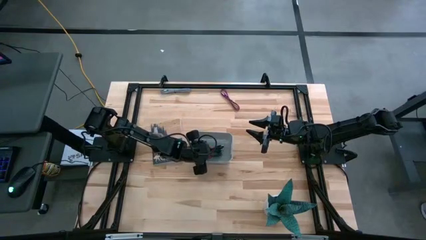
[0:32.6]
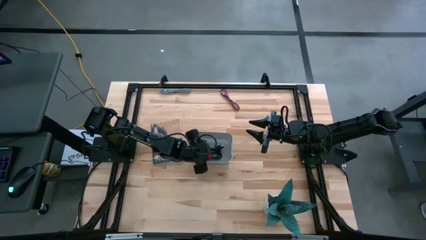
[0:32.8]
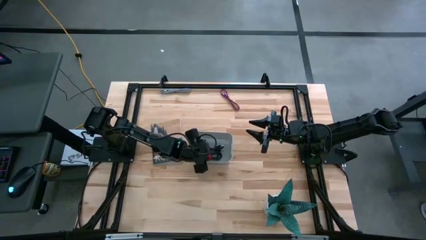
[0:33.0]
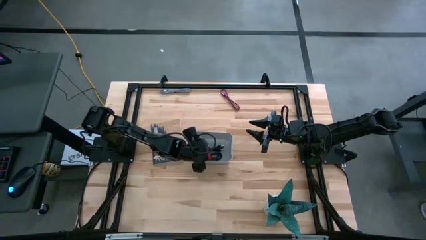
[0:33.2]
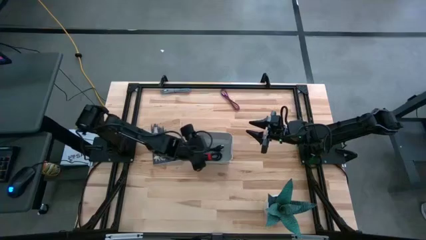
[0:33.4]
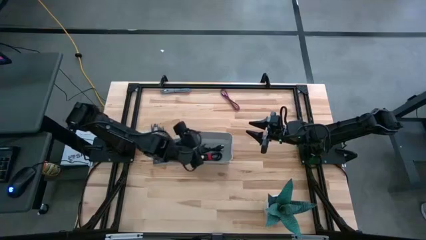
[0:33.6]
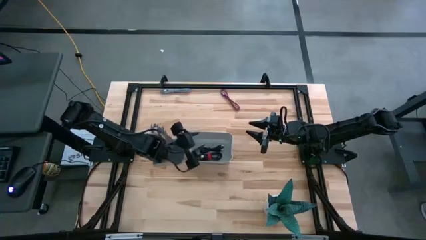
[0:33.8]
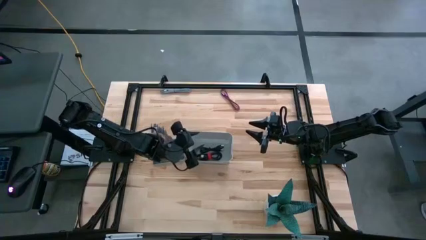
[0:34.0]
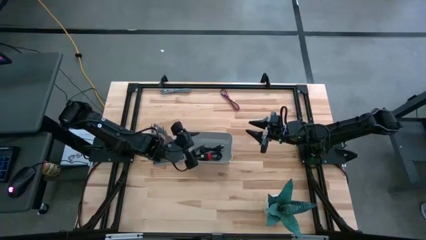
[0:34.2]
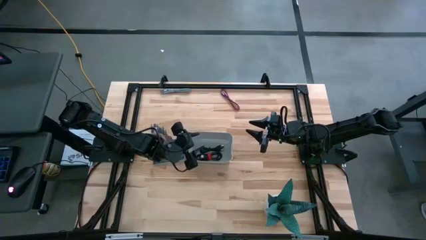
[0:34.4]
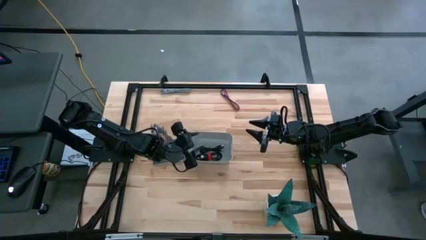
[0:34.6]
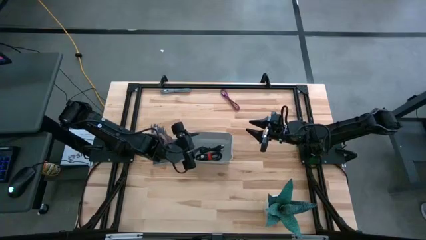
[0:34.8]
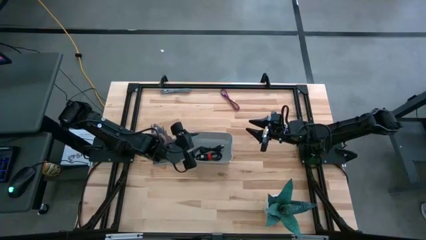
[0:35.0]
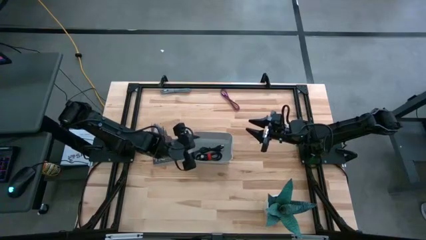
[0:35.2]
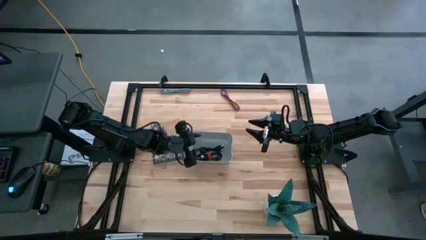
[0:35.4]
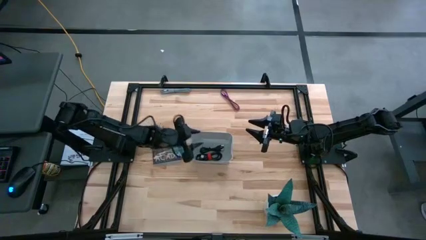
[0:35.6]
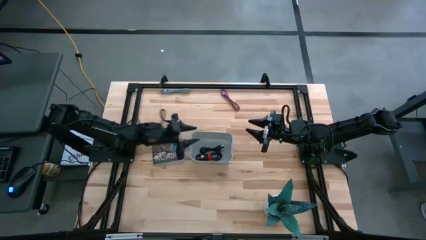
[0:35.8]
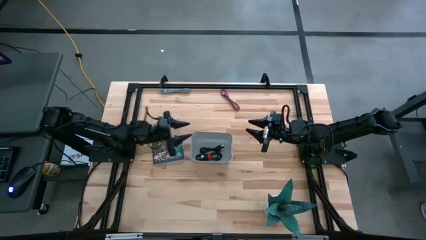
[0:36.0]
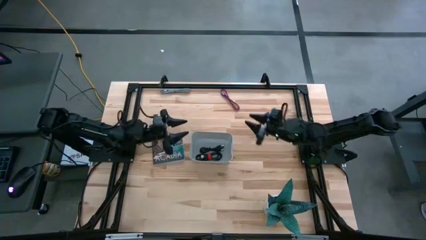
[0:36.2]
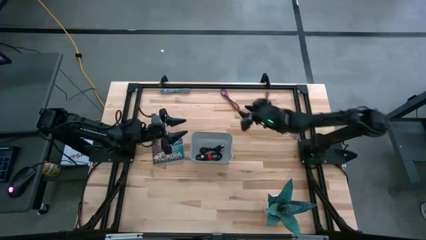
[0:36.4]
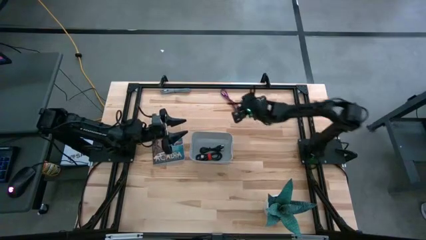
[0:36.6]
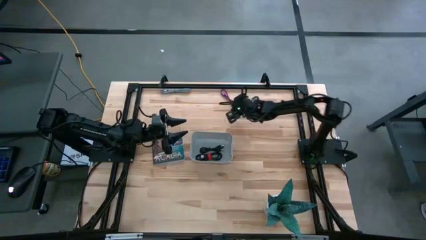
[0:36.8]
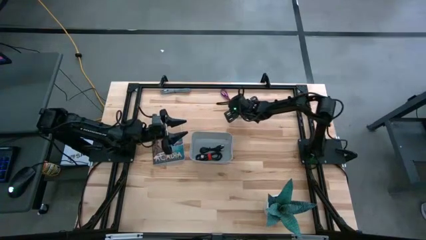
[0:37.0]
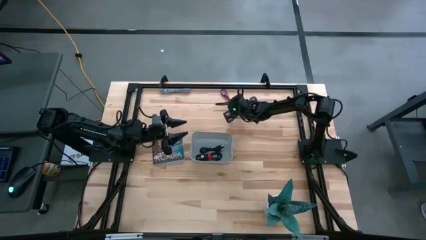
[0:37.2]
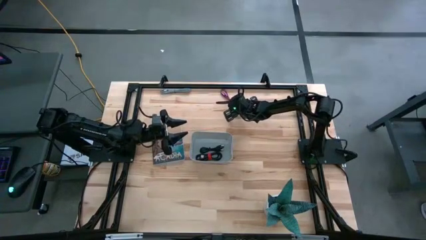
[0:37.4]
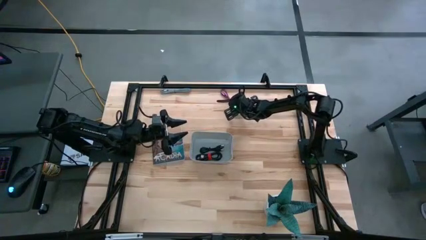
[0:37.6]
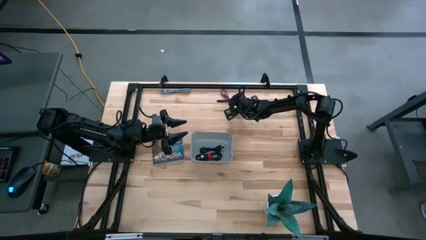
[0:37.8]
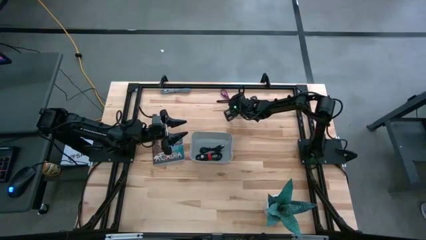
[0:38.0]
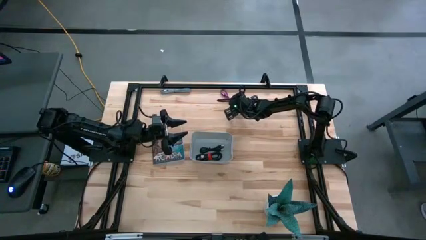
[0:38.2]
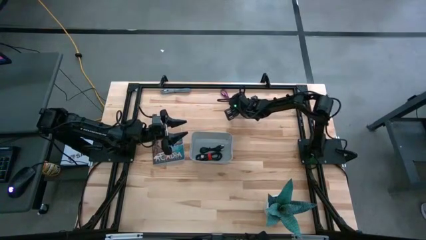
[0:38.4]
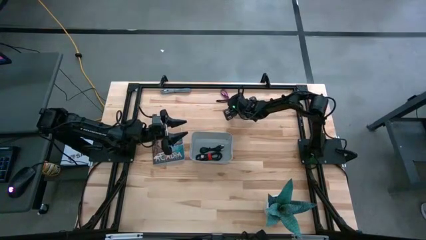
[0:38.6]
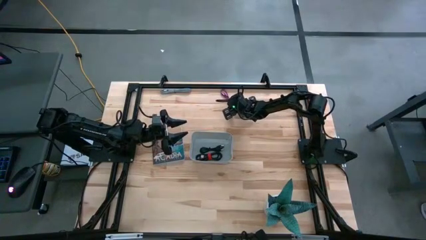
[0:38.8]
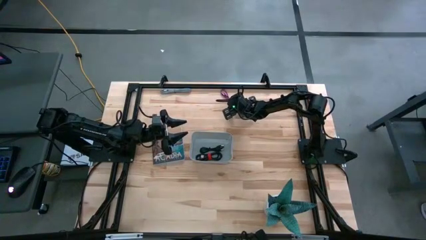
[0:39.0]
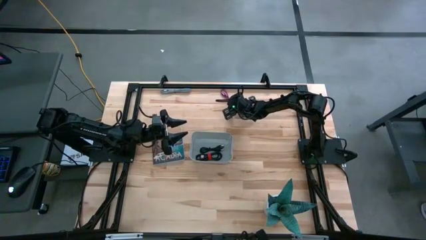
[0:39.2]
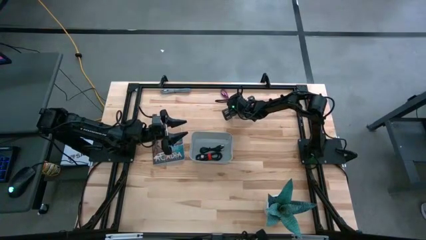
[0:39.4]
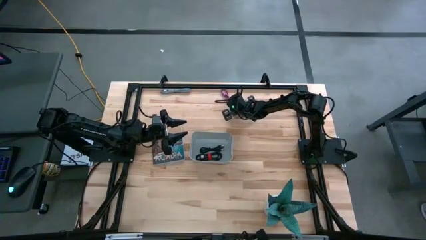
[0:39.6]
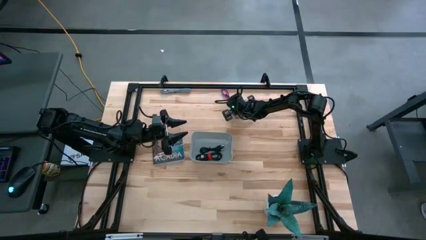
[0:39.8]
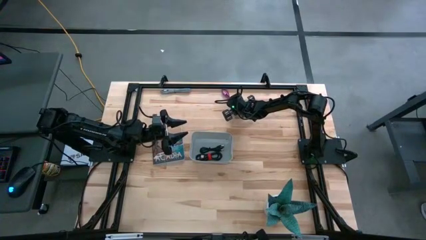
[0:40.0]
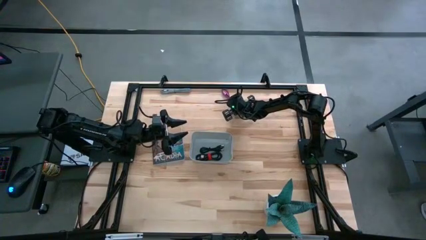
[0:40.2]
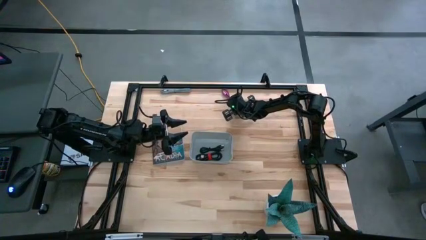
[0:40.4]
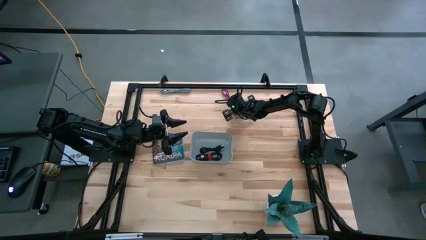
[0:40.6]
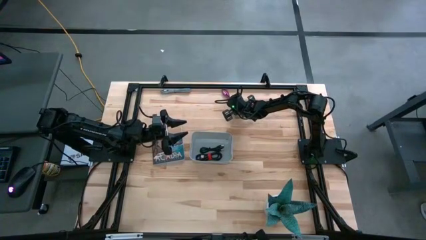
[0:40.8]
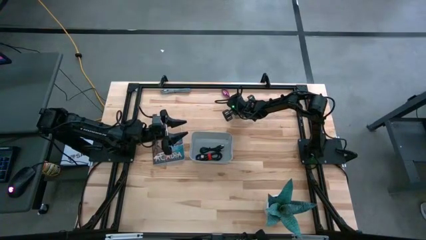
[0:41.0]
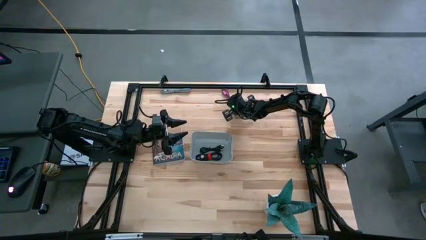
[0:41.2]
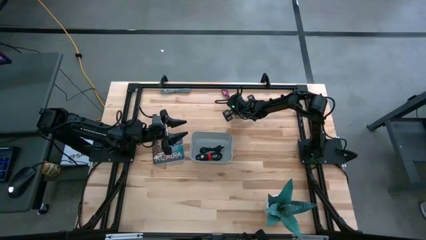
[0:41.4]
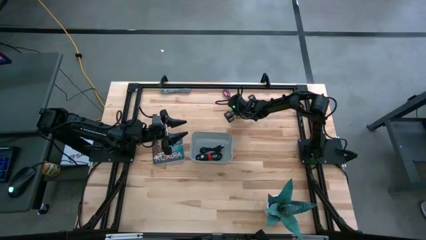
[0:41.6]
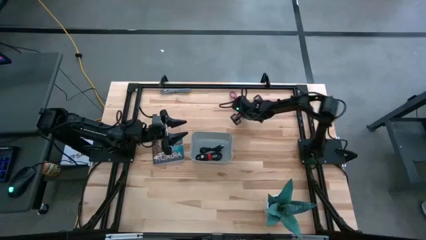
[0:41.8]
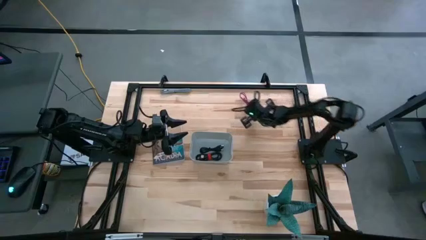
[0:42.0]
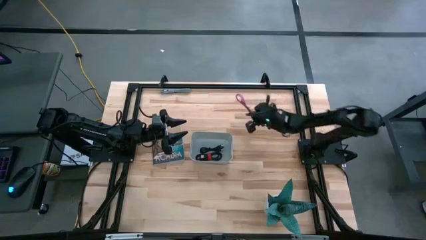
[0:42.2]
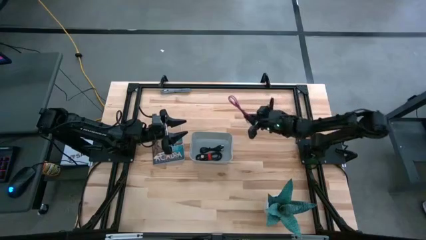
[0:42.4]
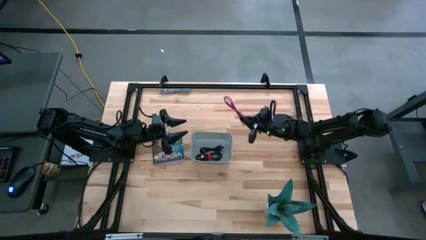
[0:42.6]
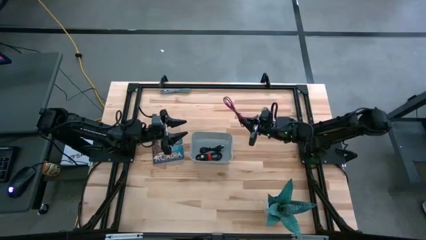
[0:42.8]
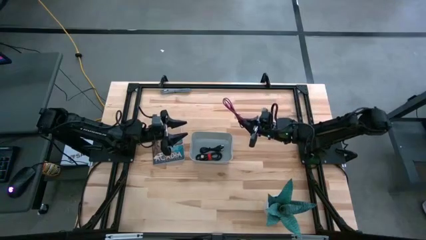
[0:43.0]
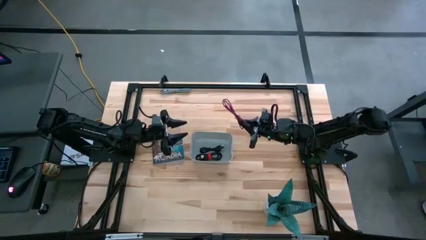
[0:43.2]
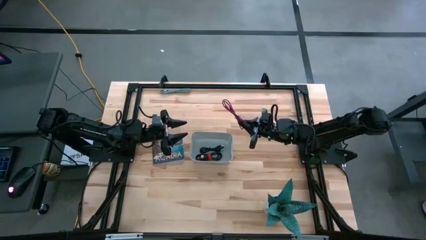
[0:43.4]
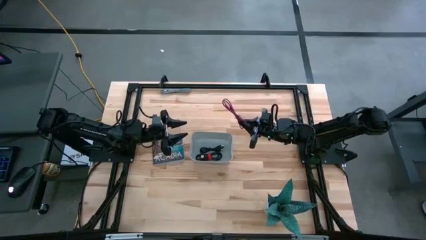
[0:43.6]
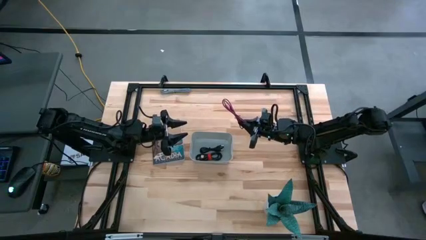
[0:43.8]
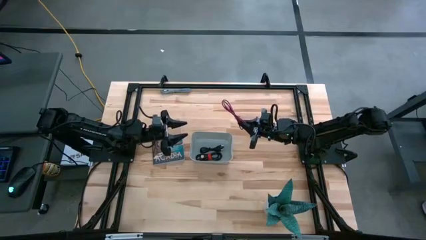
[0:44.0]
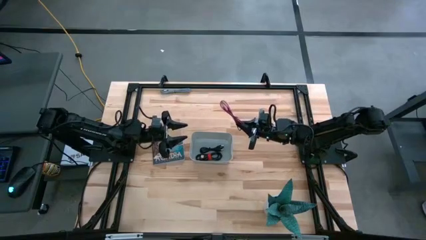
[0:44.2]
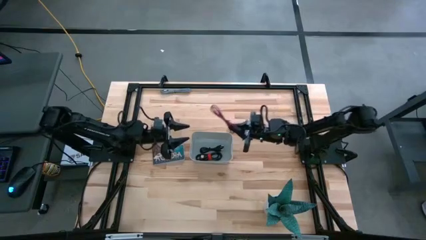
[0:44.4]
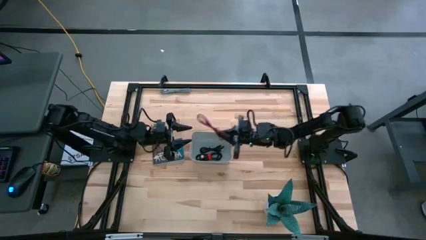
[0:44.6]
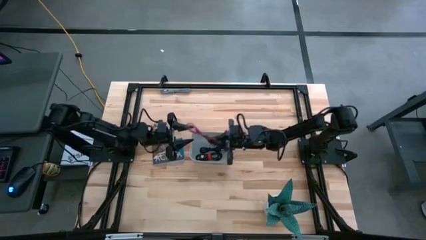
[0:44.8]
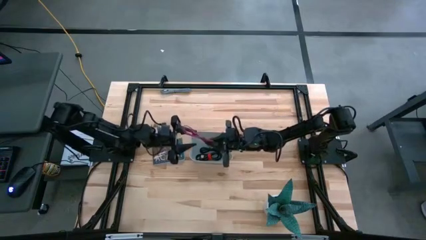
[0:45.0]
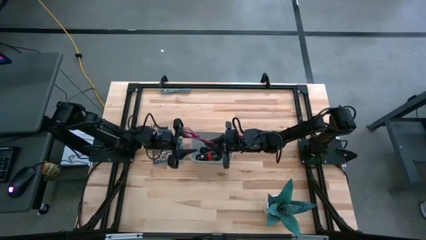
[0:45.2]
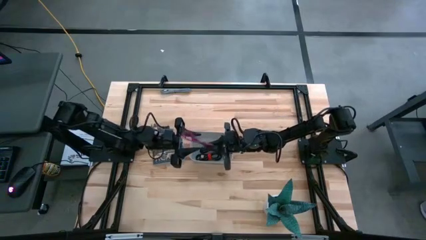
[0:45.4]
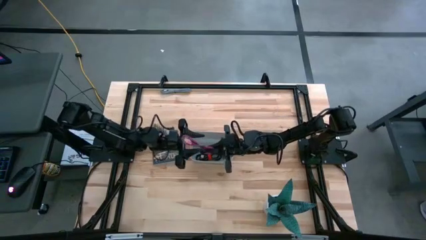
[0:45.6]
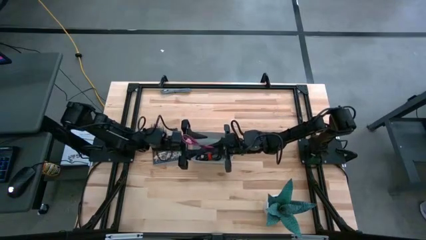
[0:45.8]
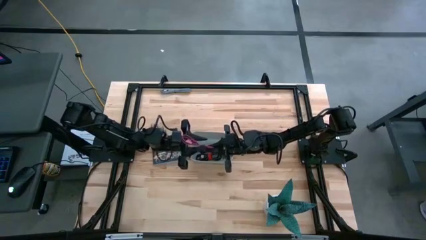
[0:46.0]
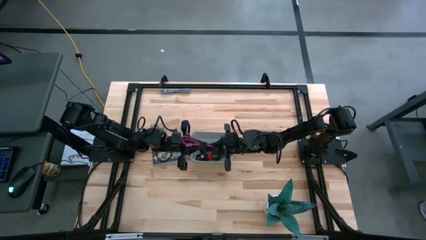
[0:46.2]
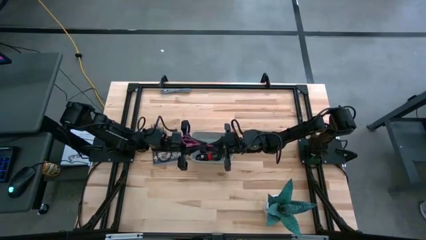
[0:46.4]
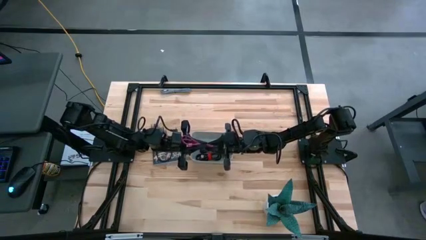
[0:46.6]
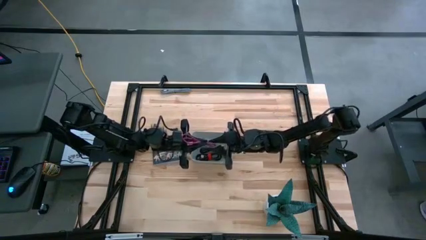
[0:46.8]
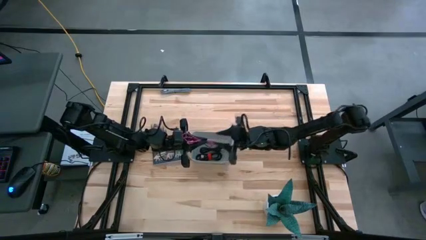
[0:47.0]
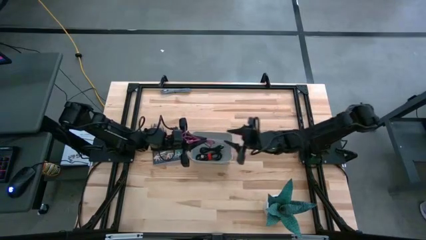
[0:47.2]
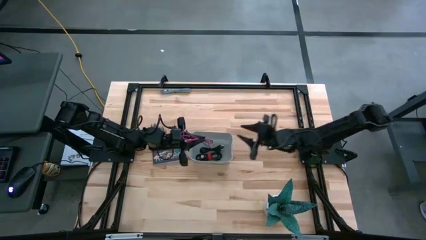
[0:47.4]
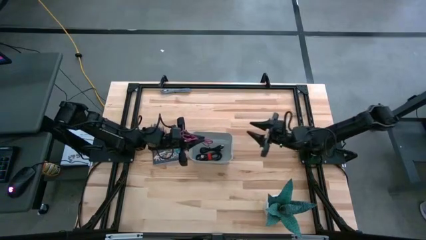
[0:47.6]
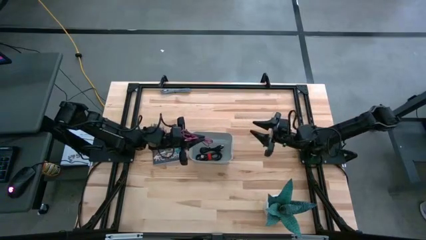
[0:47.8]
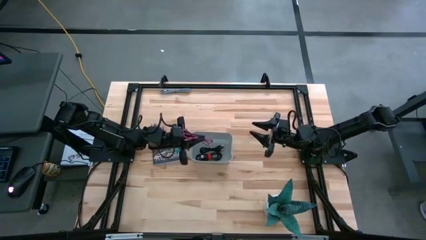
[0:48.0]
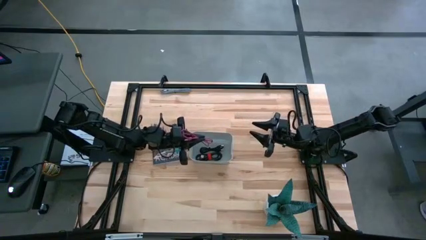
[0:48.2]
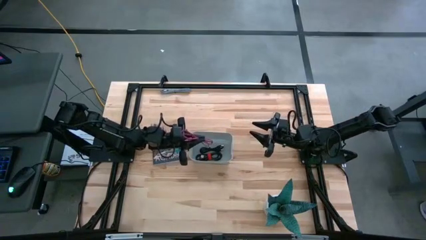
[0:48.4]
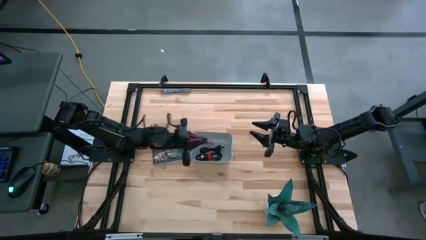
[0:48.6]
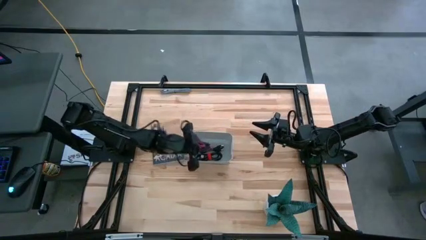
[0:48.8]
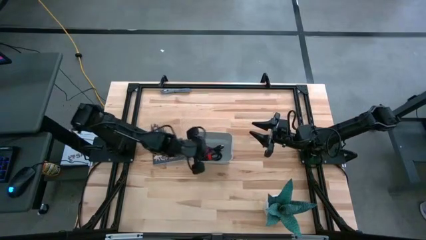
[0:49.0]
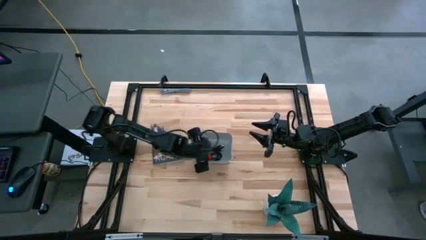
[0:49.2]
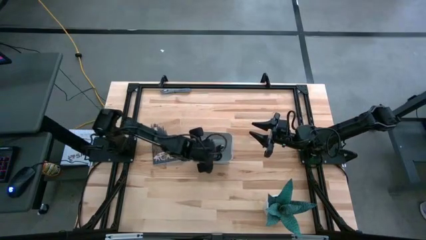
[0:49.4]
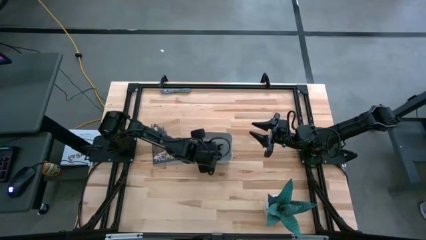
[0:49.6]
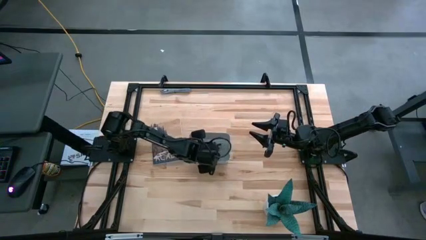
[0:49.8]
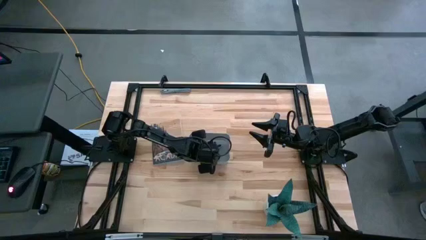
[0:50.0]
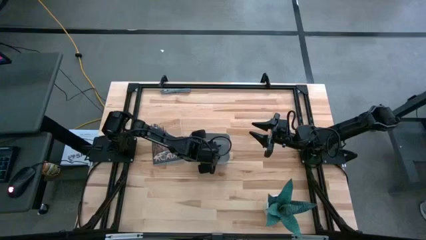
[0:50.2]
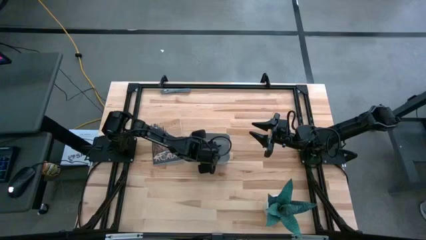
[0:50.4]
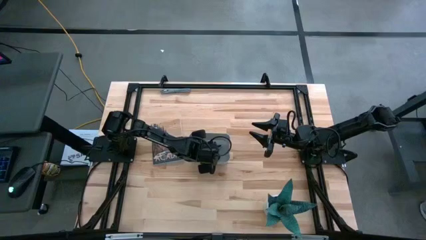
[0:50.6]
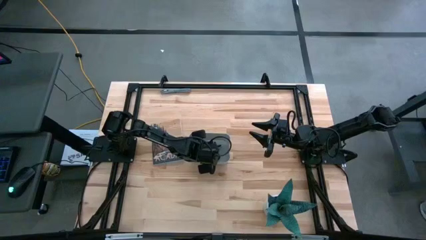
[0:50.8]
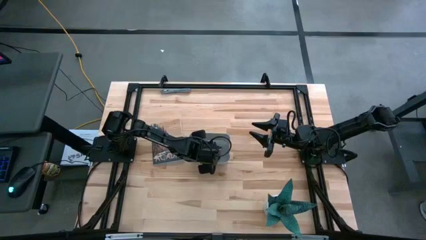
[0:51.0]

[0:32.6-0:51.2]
Task: Pick and place USB-C Cables
Put the black violet charger cable into the gray bin
